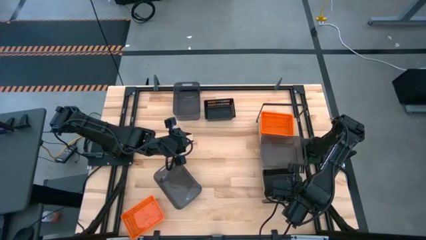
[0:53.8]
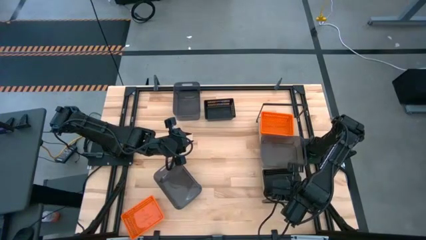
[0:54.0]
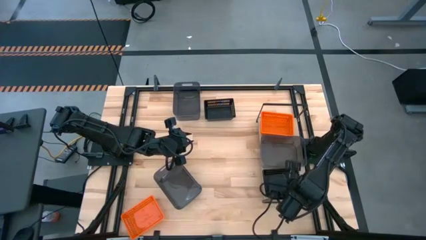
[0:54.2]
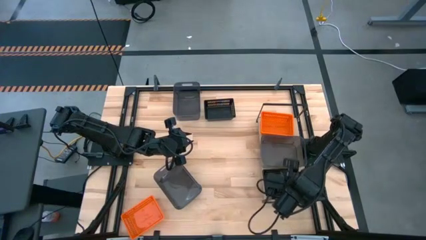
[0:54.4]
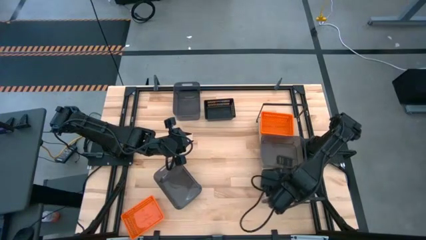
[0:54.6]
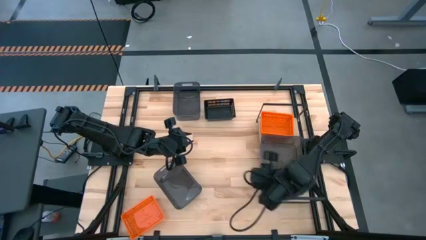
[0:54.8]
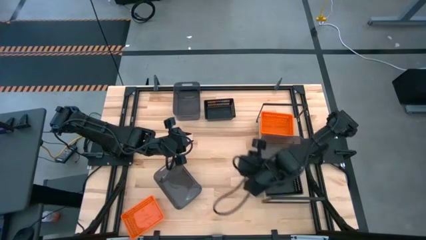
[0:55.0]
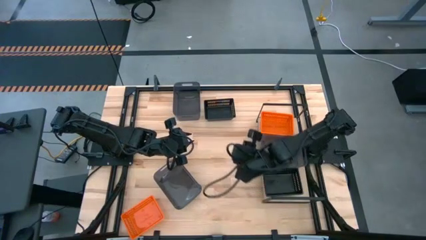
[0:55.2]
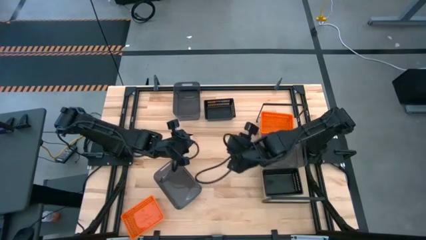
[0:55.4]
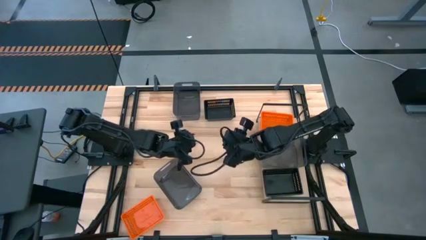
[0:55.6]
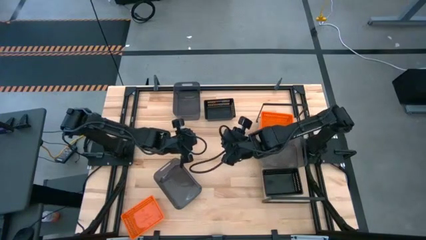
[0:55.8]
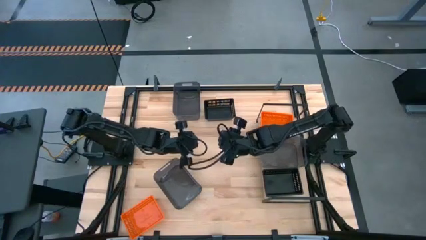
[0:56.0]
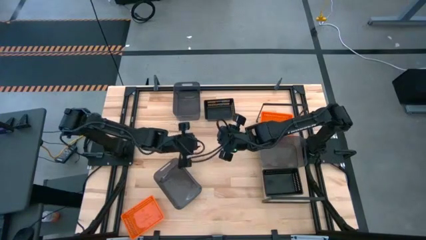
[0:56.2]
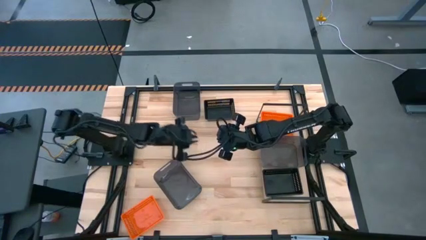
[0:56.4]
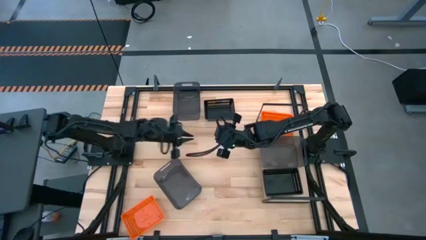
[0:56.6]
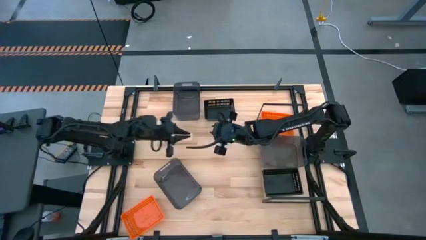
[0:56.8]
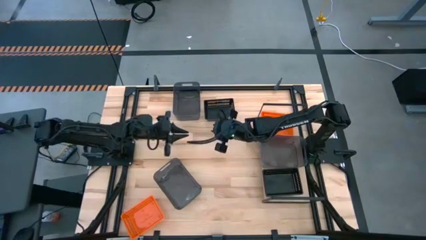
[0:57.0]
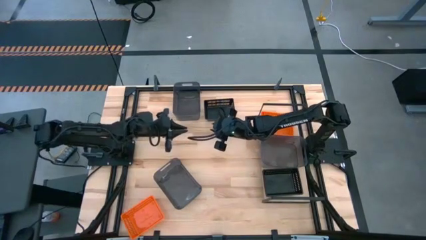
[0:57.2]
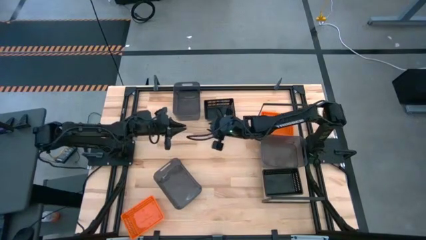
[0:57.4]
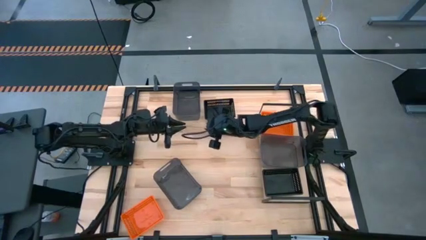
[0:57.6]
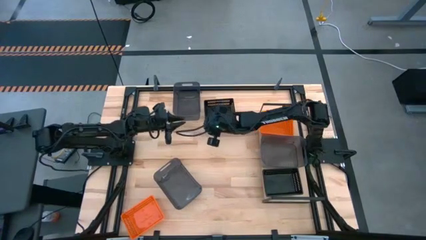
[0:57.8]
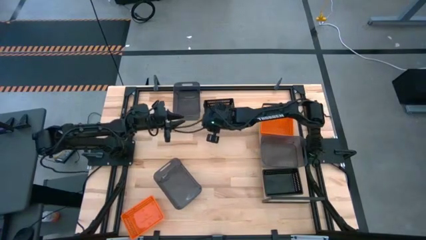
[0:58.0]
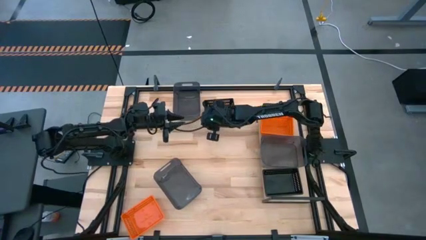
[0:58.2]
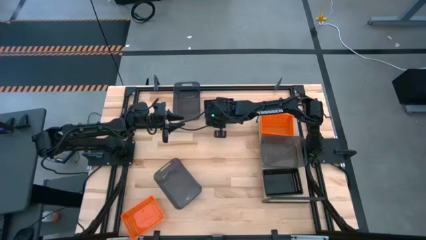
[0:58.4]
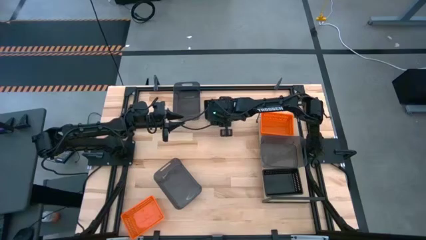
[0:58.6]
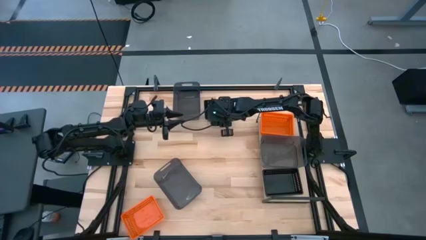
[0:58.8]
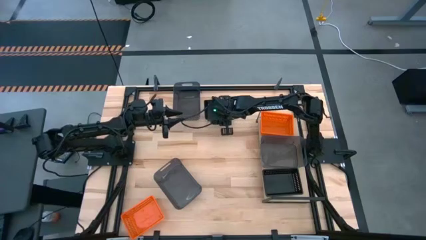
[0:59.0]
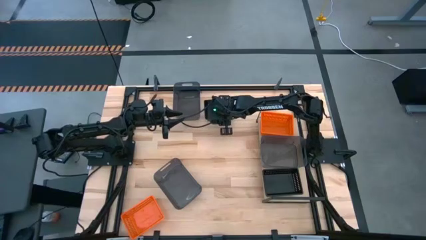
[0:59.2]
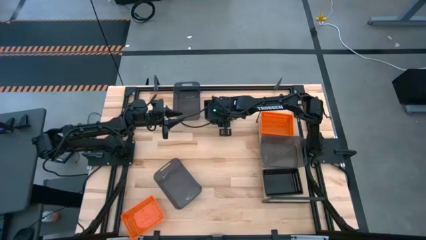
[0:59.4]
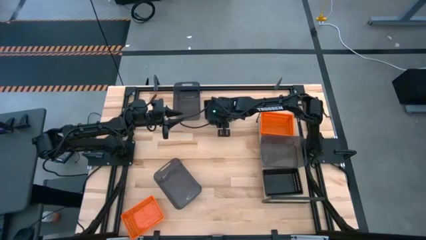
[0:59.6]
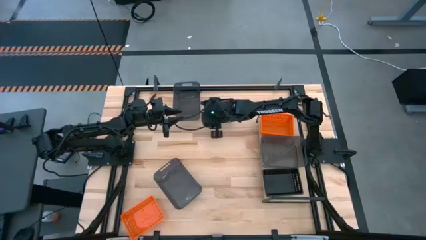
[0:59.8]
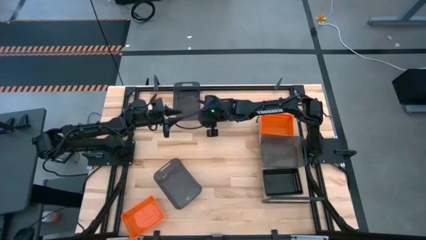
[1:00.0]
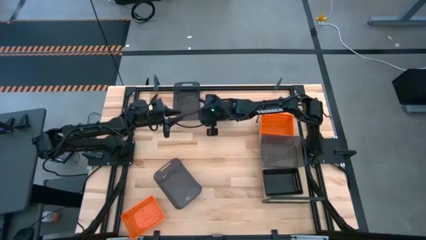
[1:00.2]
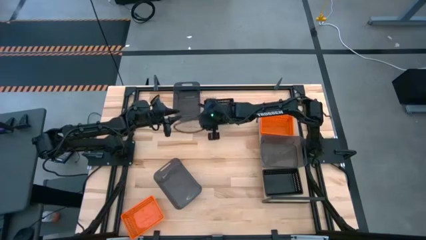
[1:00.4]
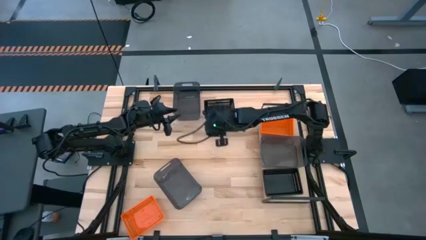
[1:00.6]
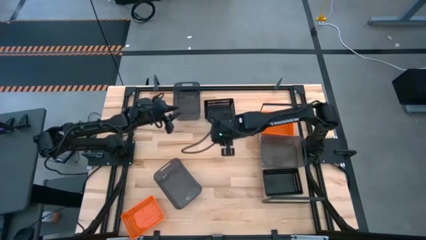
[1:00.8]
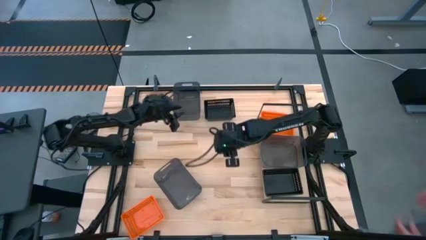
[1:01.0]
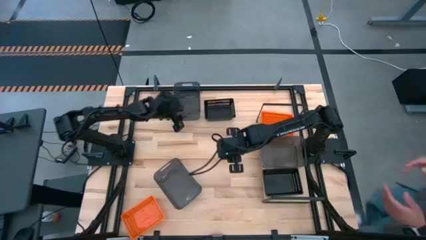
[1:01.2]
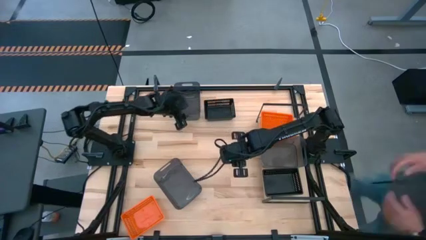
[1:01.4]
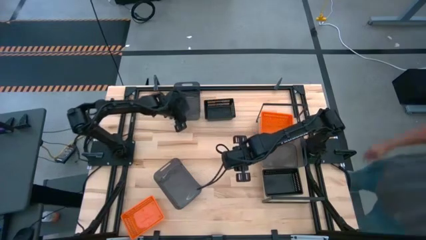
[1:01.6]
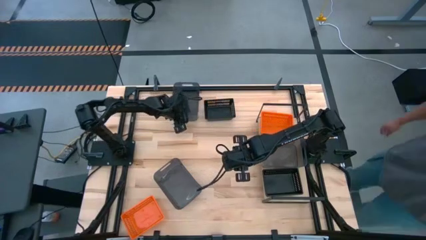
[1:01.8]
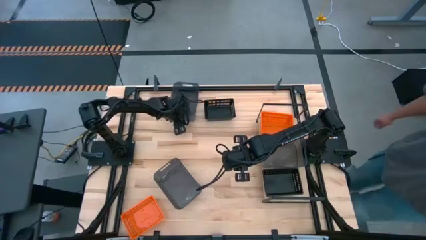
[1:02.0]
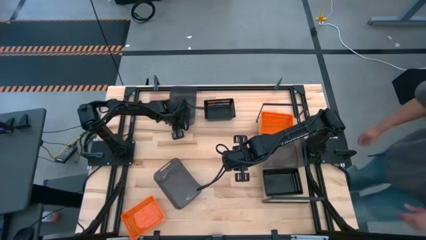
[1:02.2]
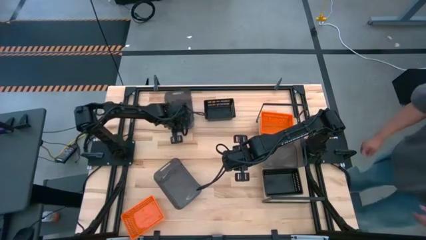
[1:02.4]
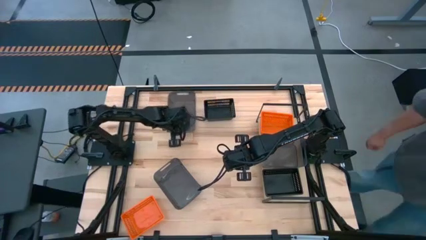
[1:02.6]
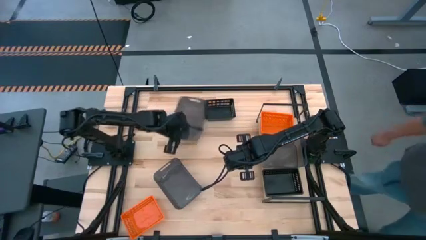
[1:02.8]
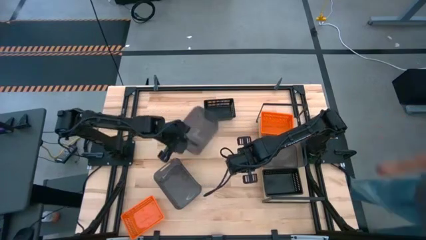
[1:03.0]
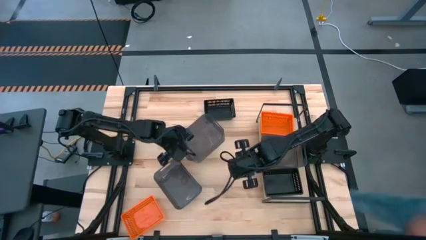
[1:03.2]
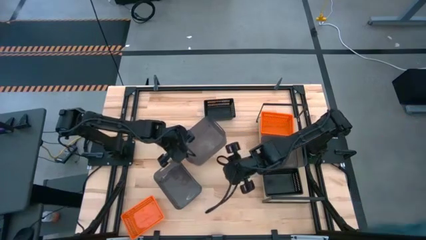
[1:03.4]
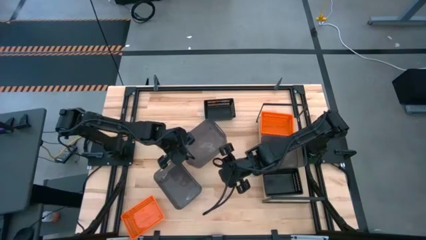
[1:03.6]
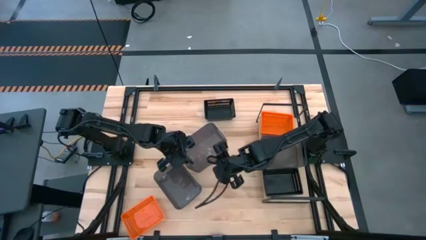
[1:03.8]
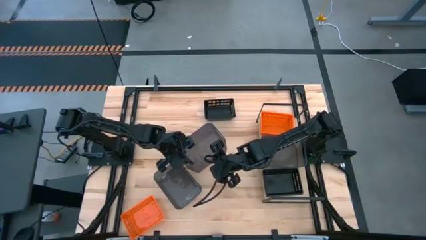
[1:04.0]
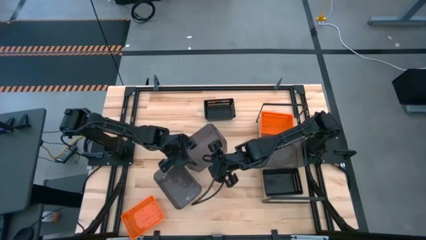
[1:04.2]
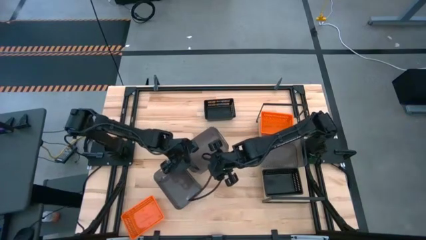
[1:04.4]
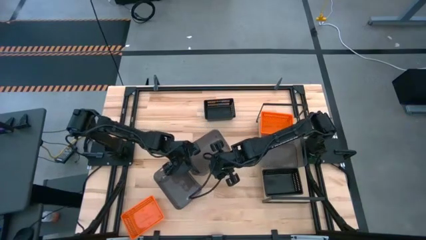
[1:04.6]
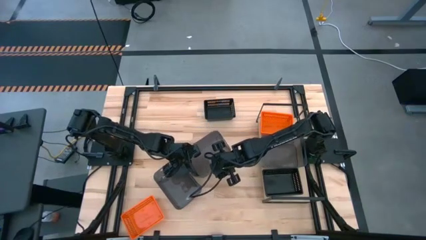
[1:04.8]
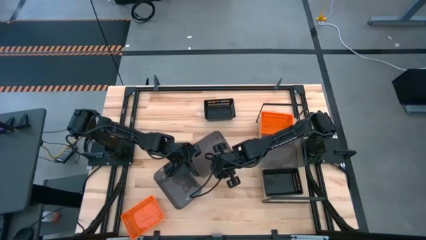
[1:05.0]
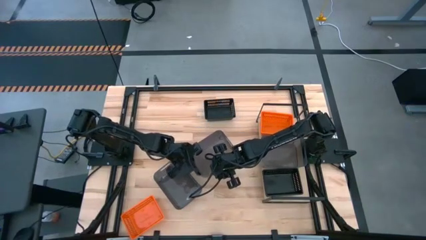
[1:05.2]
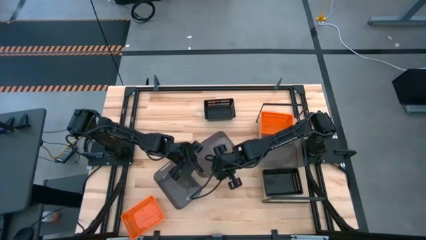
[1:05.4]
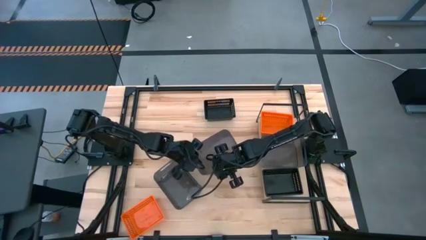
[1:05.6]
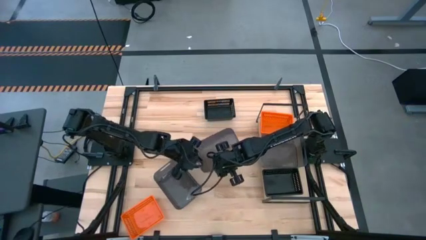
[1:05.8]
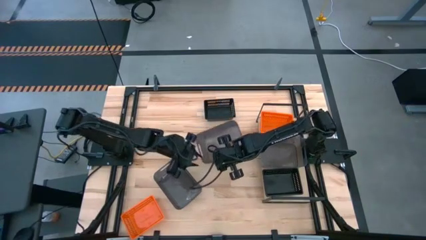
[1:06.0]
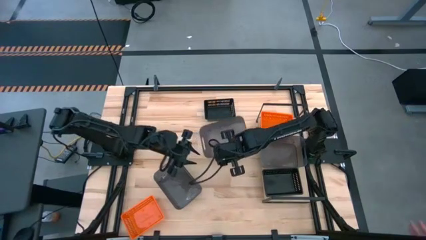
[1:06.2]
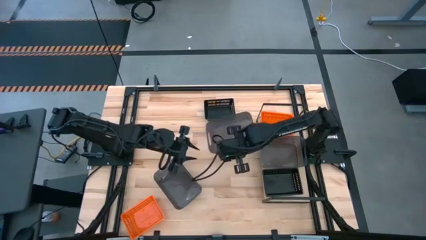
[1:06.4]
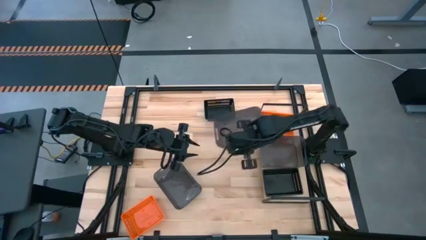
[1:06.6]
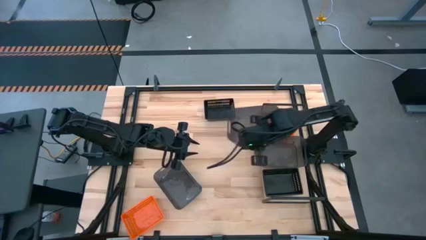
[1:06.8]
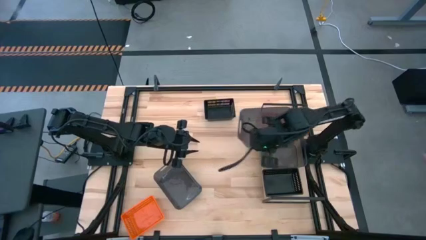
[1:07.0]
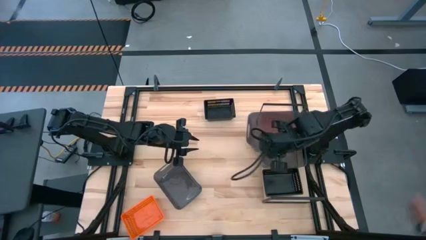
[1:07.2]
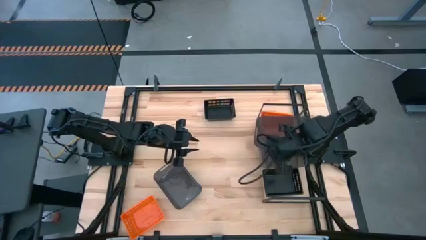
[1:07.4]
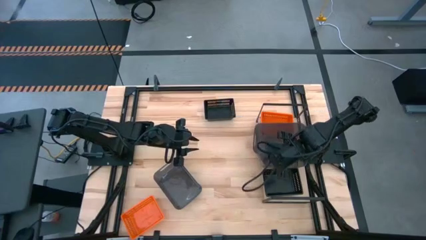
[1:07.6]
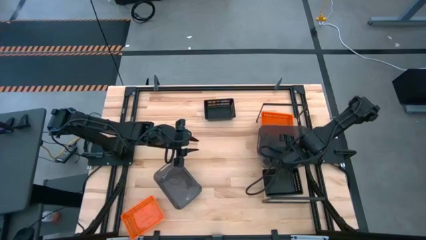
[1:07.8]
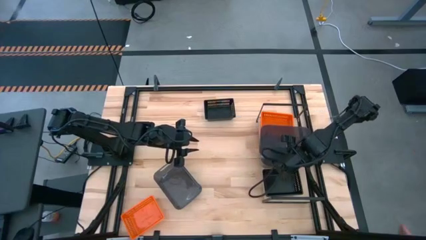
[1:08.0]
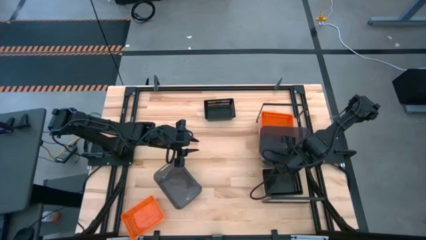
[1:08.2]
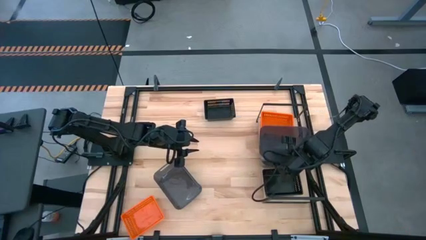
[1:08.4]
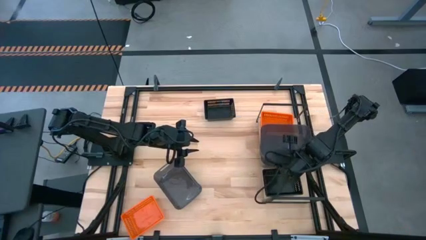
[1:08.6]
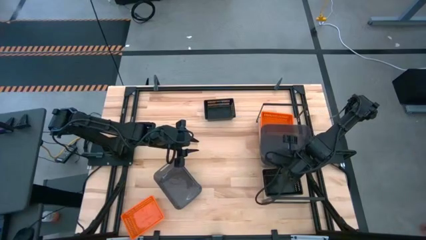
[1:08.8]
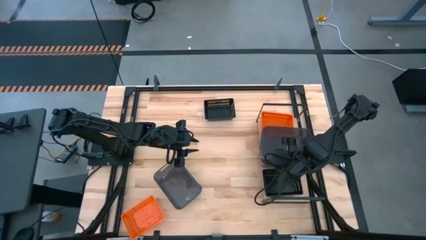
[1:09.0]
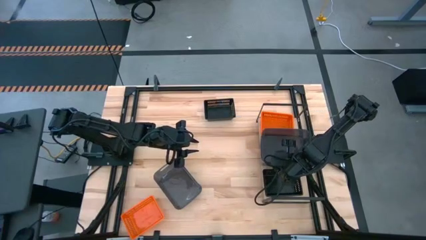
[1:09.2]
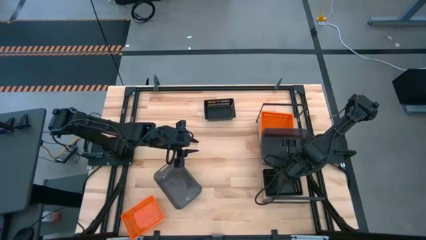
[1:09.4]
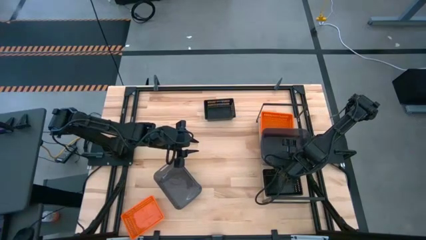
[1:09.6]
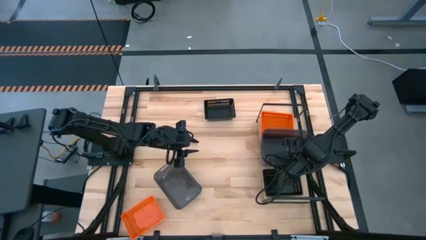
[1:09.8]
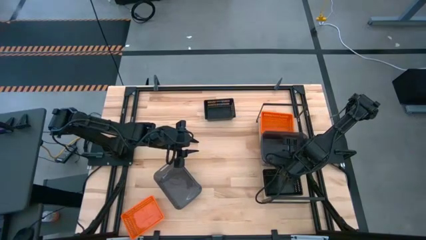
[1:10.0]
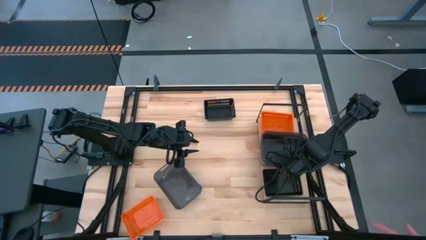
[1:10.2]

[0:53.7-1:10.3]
Task: Stack baskets on shelf by color
Stack the top black transparent bin on top of the black transparent bin on the shelf
